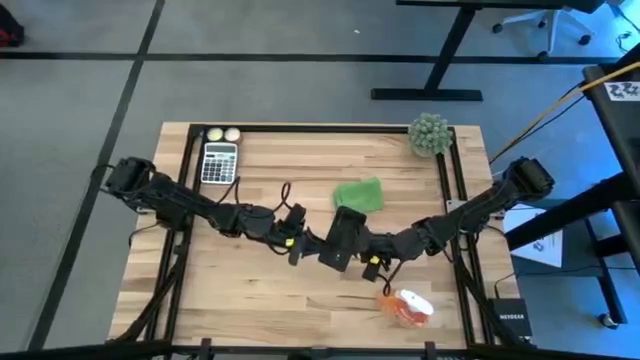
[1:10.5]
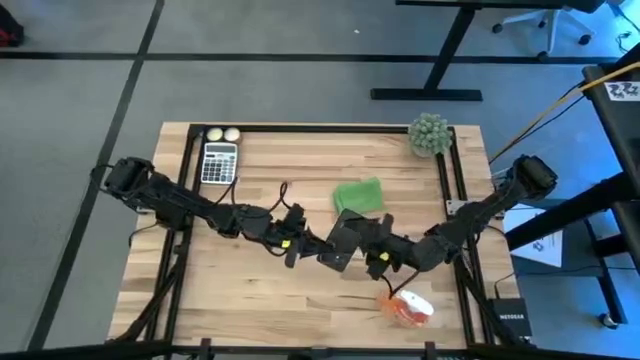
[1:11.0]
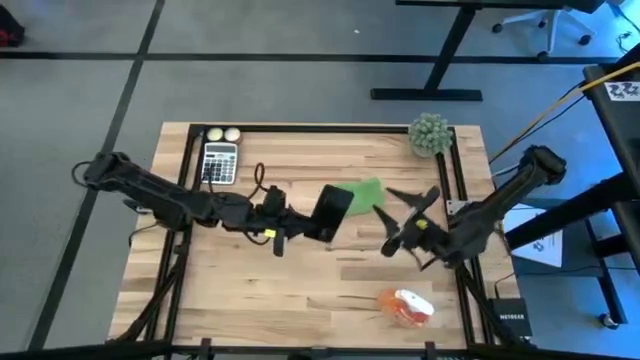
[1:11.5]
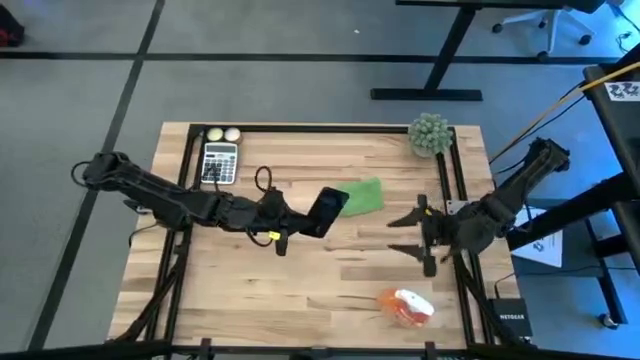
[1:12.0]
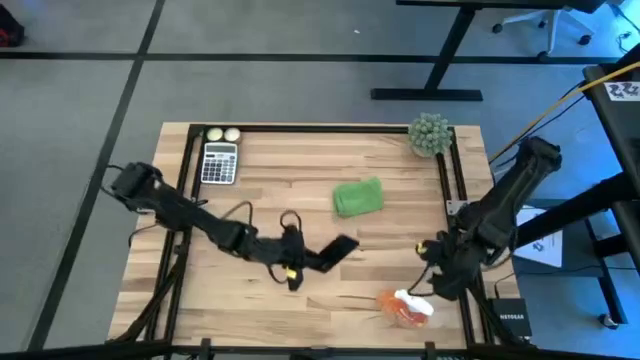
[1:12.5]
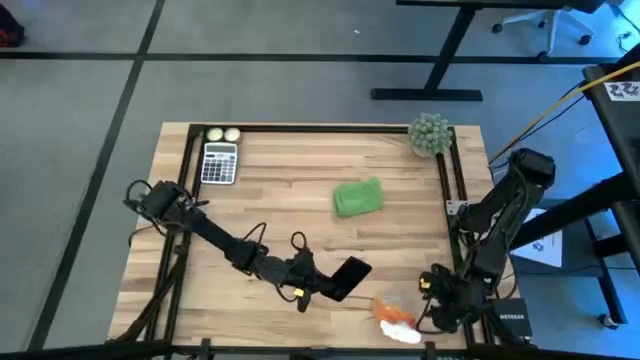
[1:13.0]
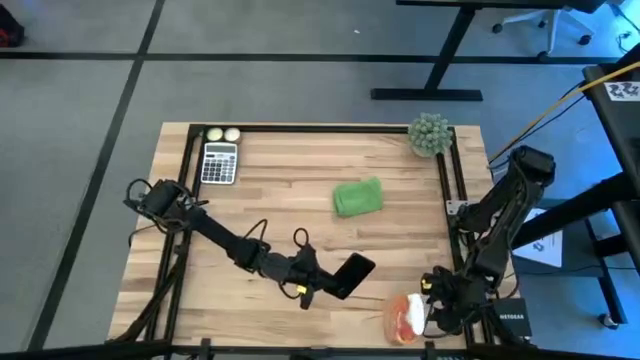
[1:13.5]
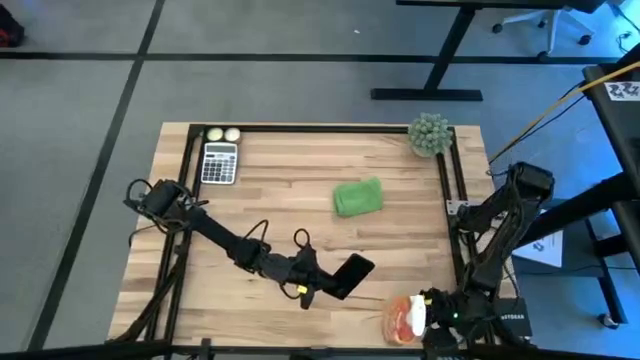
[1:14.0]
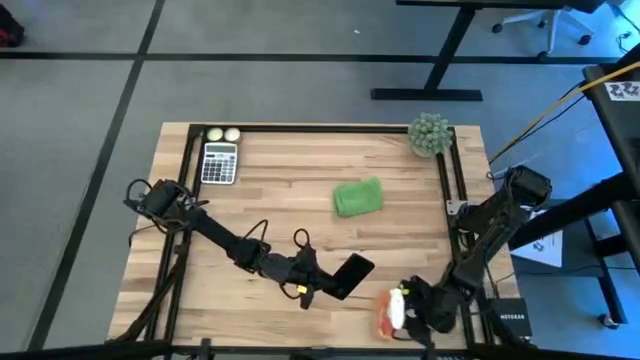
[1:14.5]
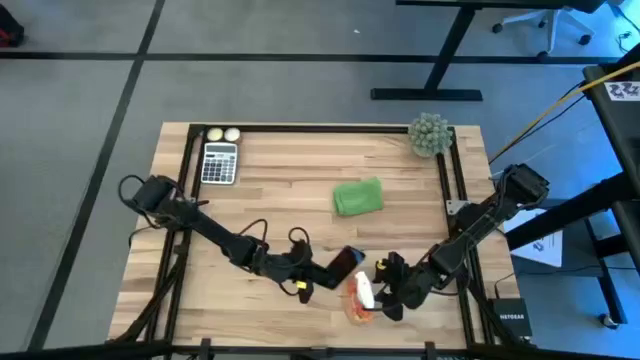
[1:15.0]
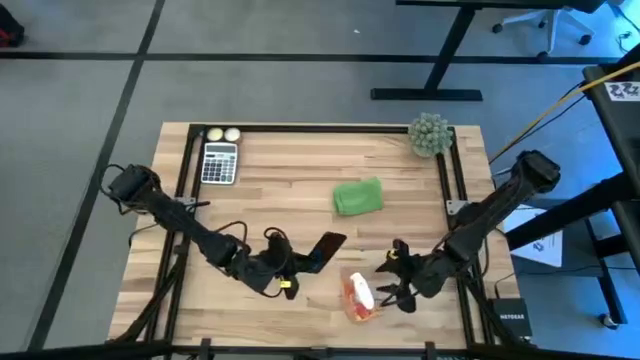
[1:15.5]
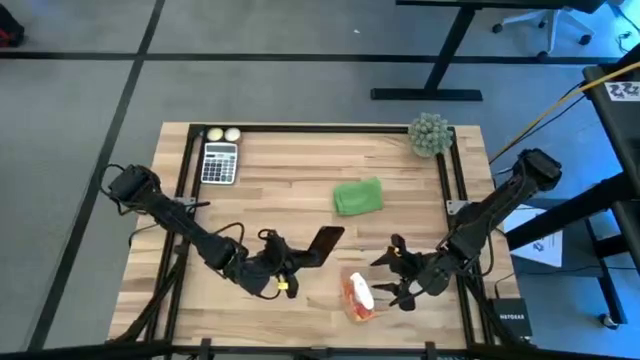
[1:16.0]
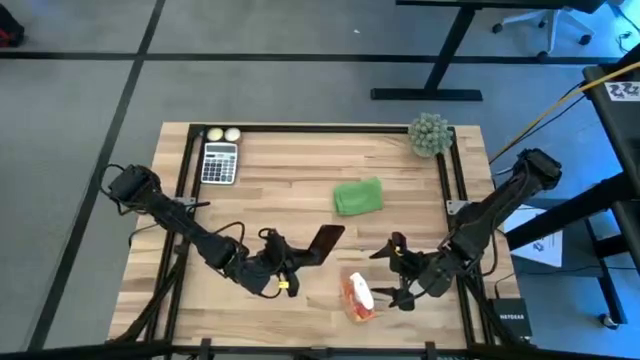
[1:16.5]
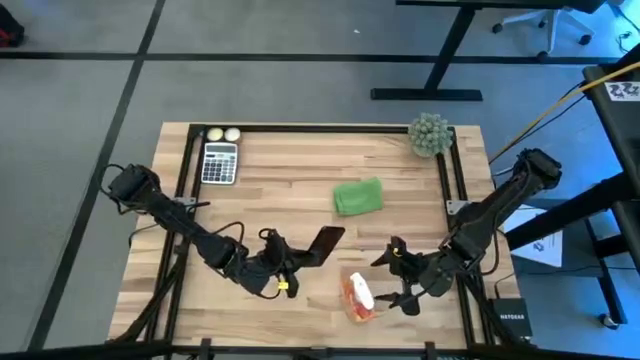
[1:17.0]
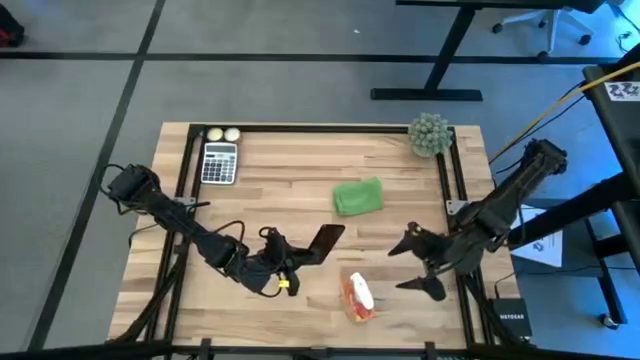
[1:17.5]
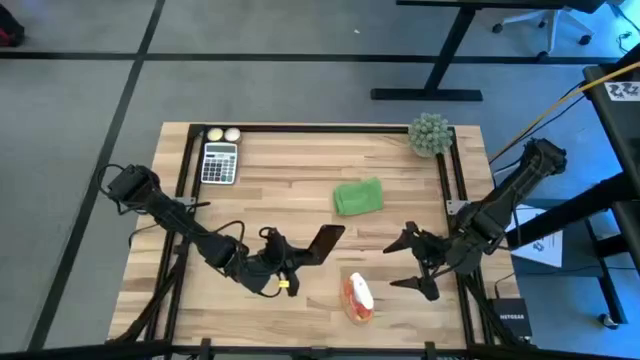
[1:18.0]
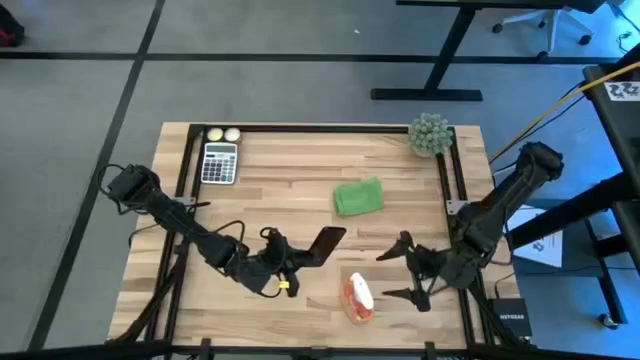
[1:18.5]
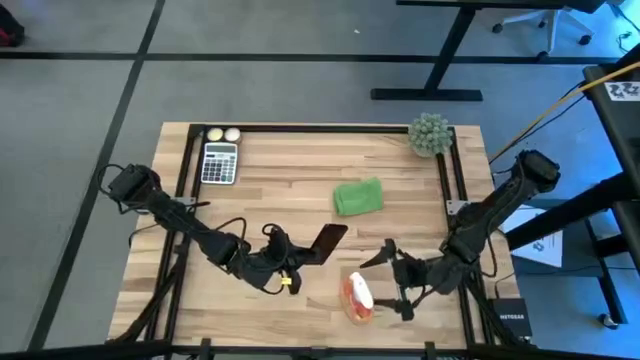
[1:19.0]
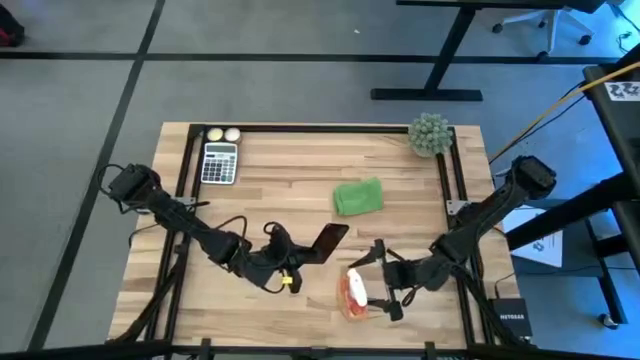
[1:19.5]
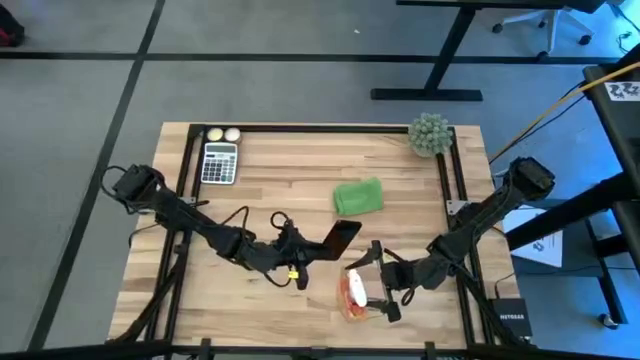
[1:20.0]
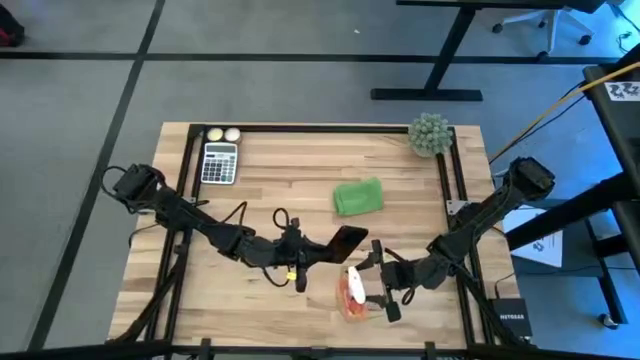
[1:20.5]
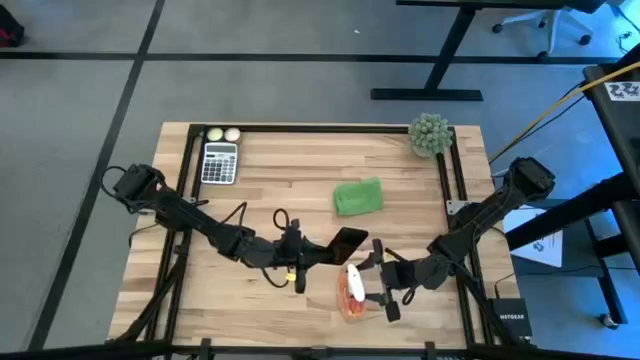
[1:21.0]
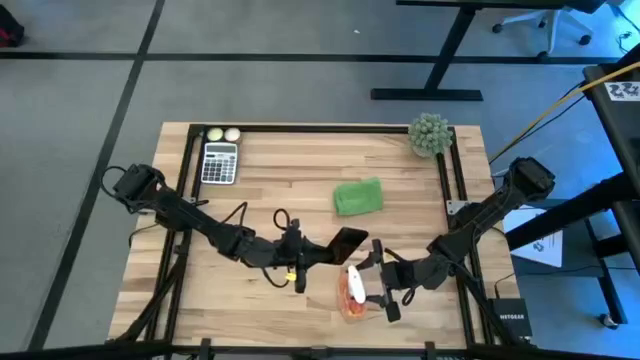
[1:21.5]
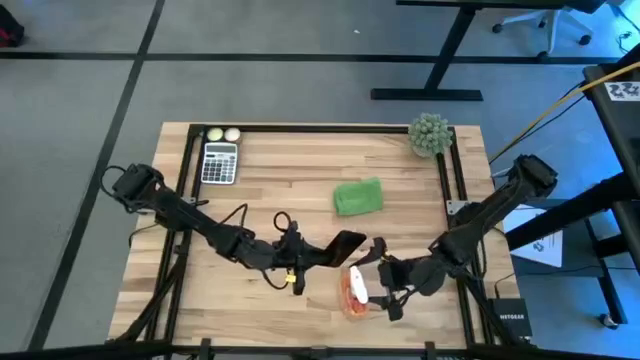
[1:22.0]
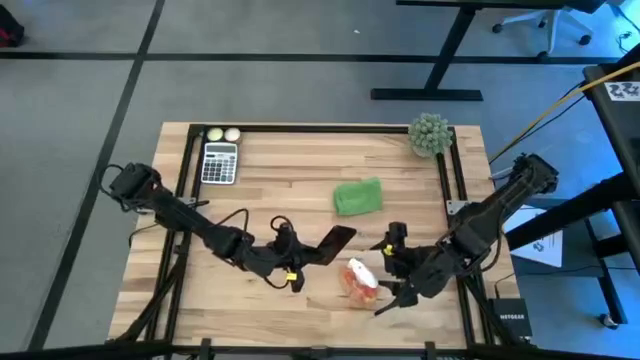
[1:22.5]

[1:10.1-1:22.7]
Task: Apply microfiber cloth
Spray the black cellphone using the cleaning bottle

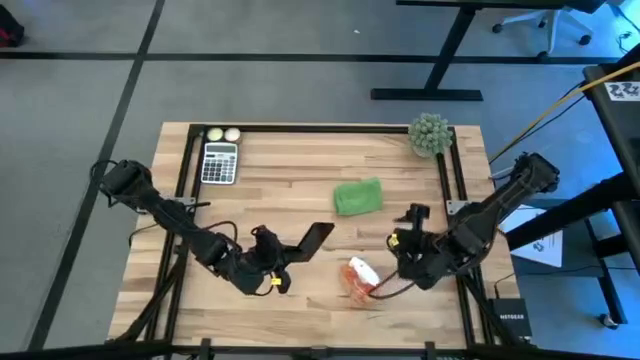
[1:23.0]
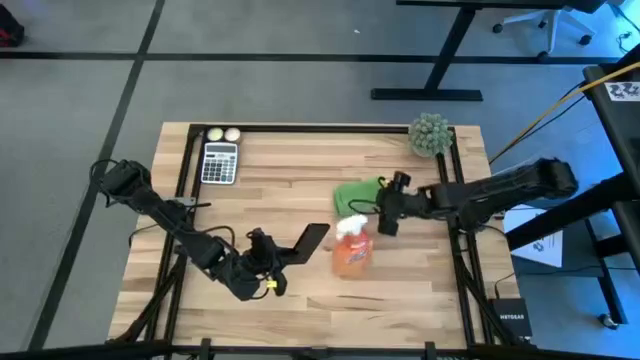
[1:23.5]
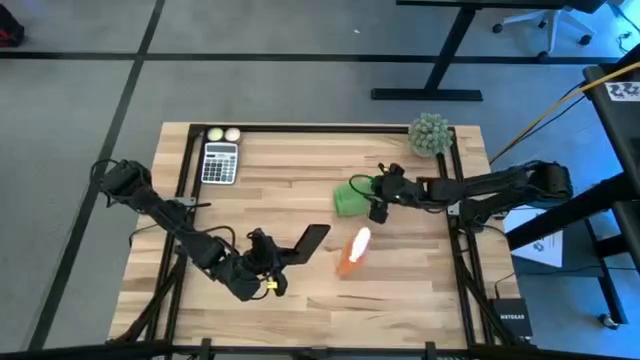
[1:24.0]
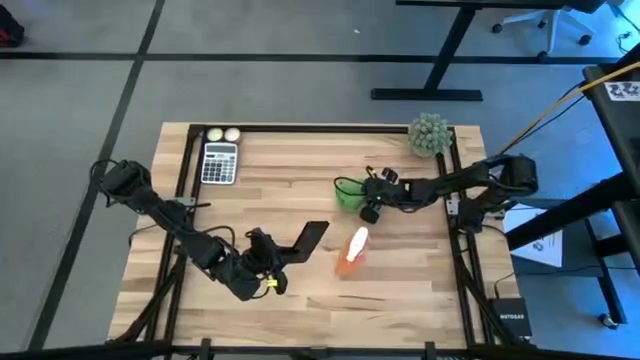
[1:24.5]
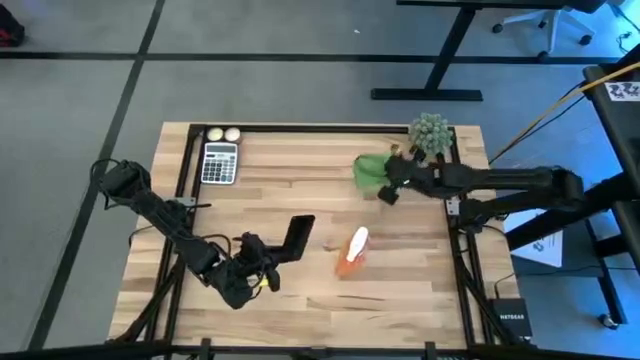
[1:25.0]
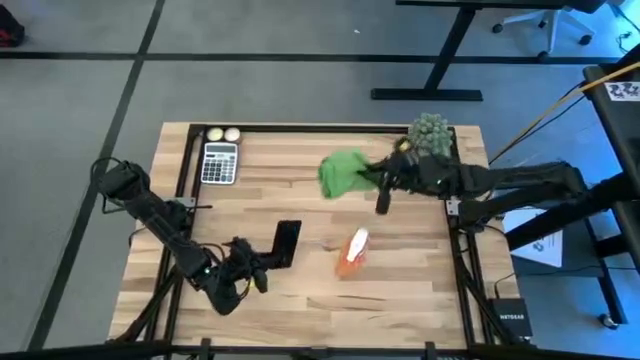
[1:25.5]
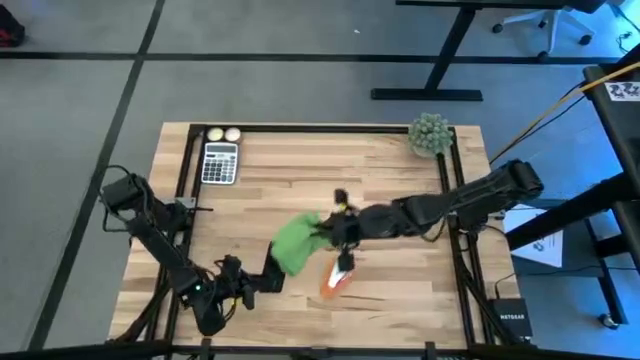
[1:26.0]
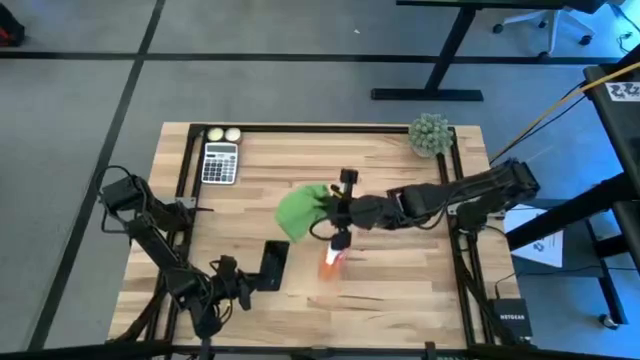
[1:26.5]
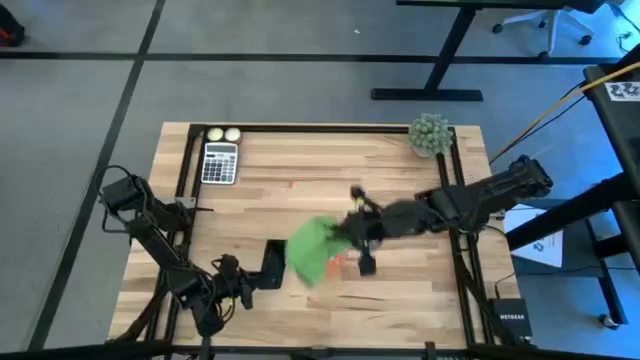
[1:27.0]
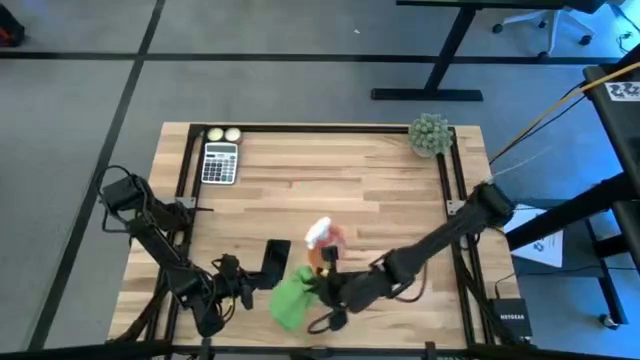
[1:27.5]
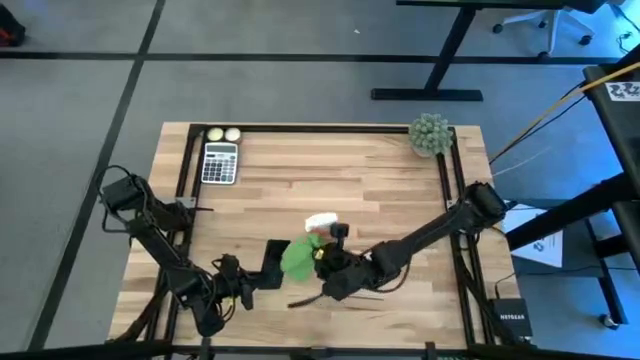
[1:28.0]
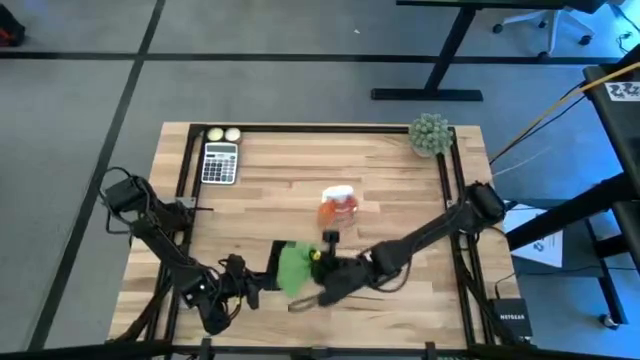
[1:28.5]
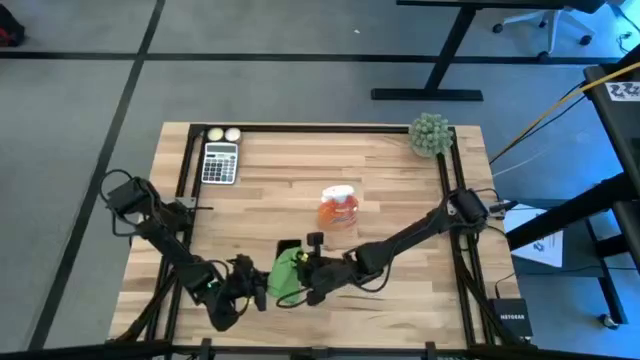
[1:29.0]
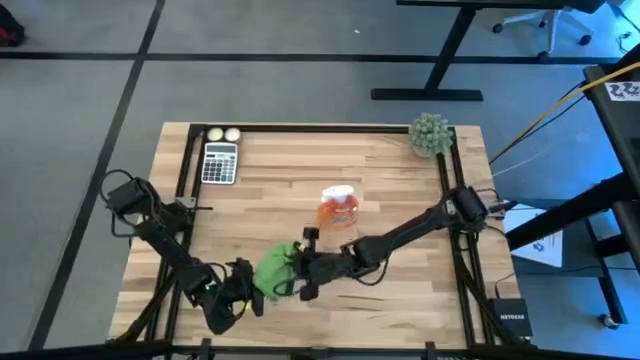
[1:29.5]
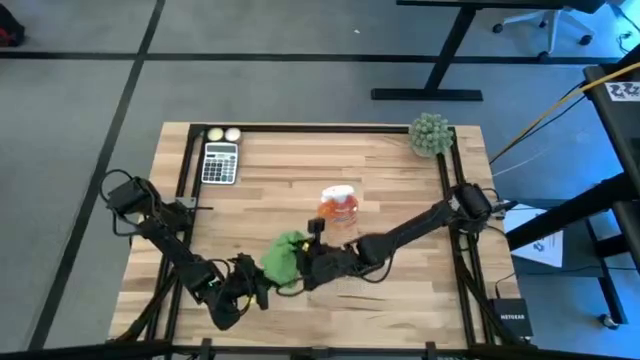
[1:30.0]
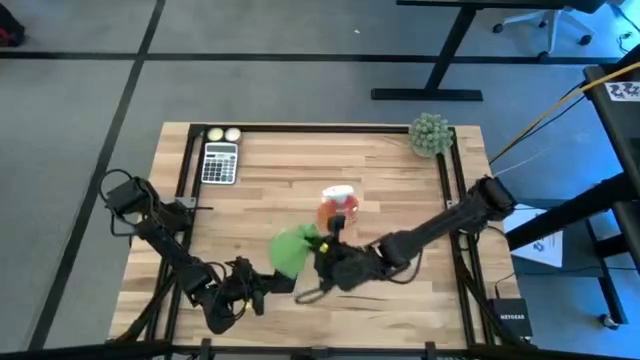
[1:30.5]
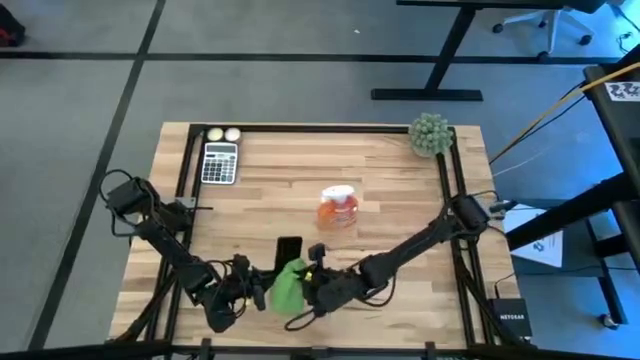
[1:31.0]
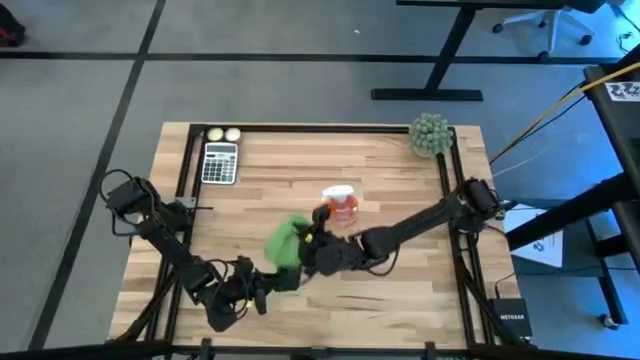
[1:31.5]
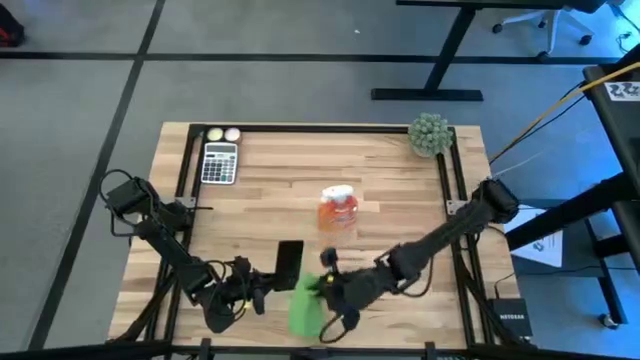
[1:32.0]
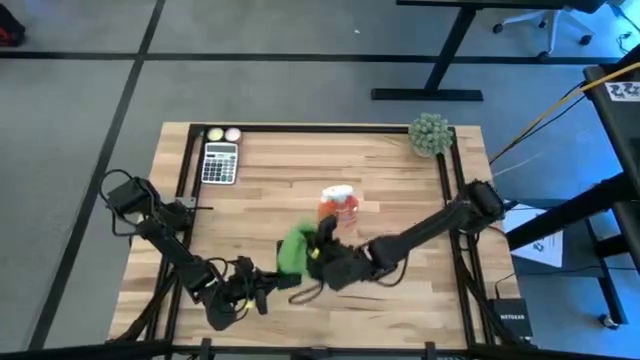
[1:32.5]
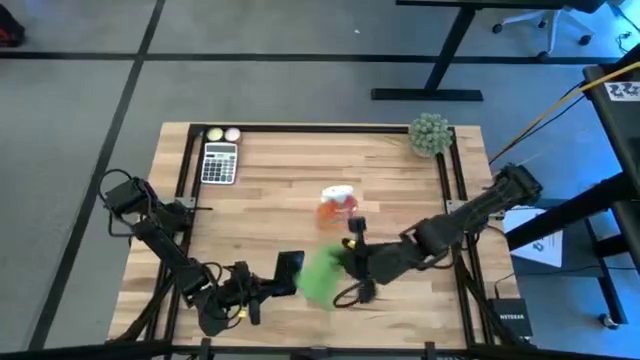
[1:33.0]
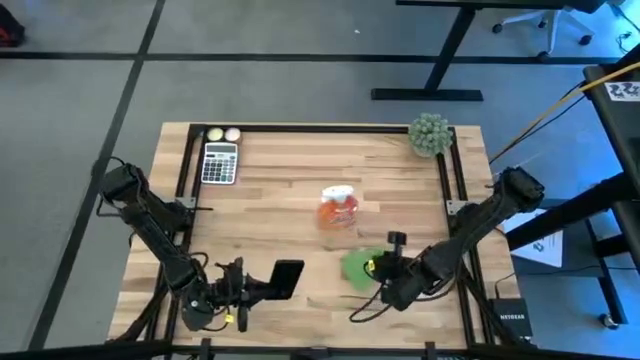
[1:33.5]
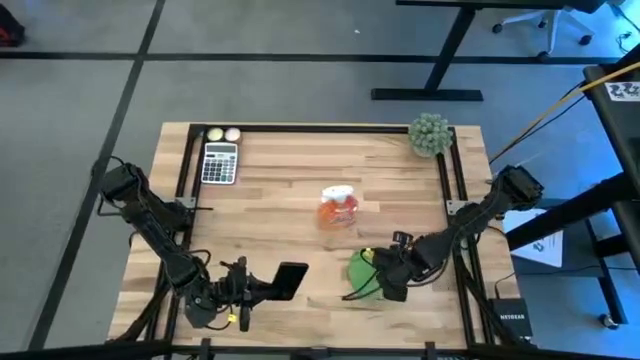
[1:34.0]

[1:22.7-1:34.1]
Wipe the back of the black cellphone using the green microfiber cloth
